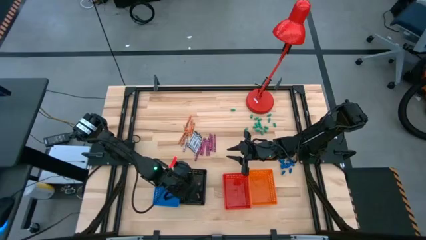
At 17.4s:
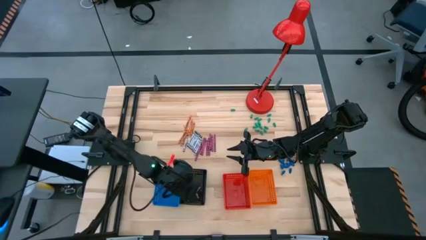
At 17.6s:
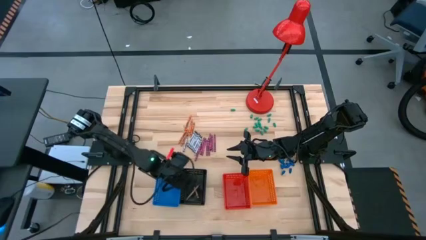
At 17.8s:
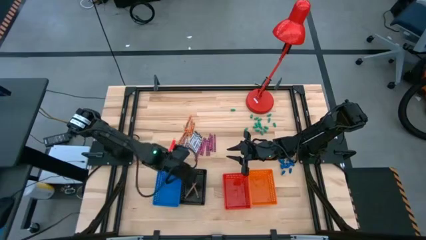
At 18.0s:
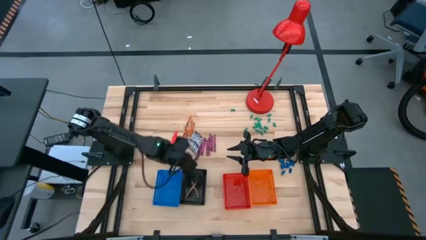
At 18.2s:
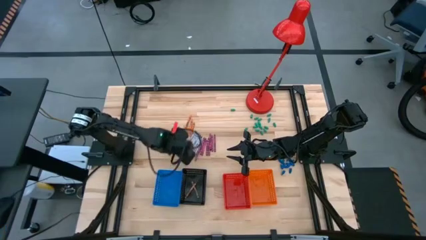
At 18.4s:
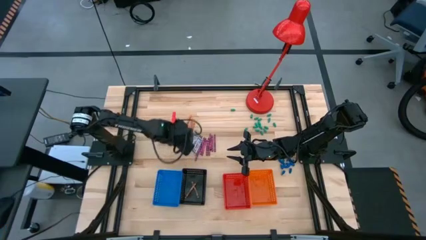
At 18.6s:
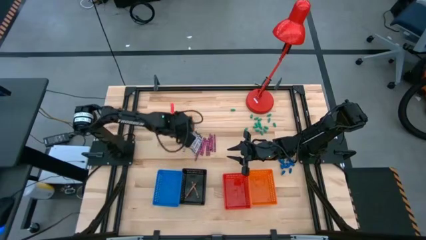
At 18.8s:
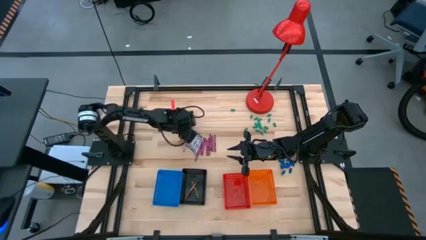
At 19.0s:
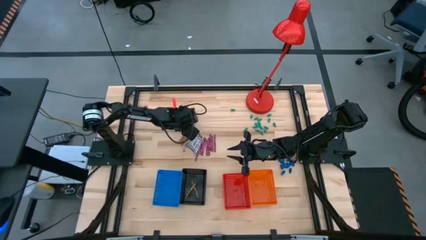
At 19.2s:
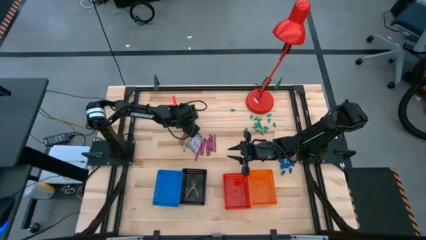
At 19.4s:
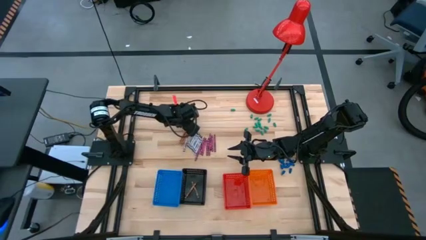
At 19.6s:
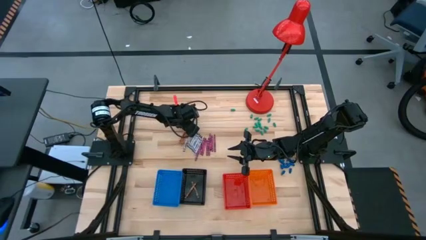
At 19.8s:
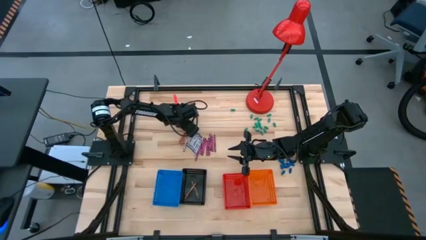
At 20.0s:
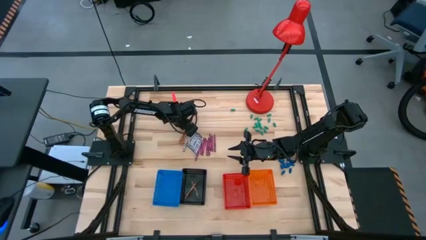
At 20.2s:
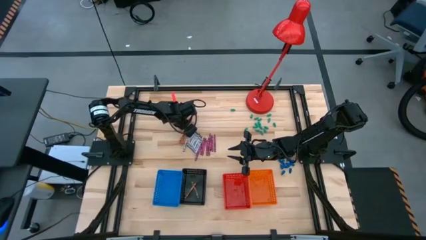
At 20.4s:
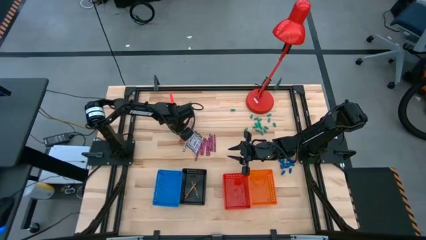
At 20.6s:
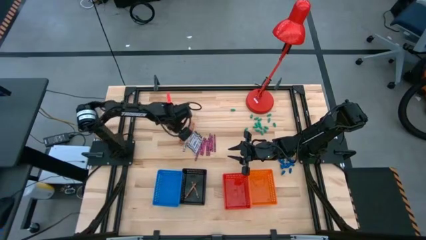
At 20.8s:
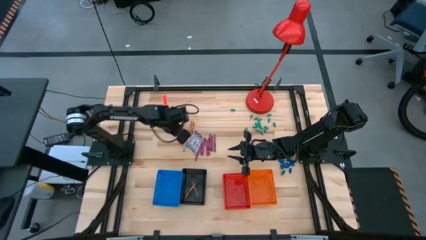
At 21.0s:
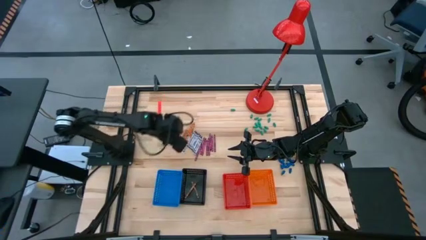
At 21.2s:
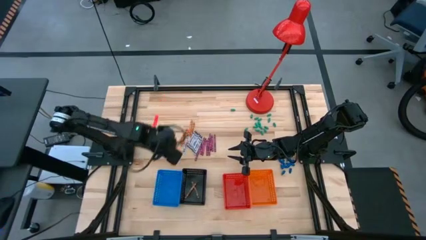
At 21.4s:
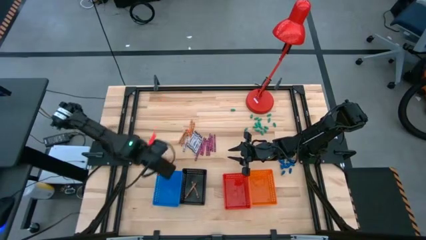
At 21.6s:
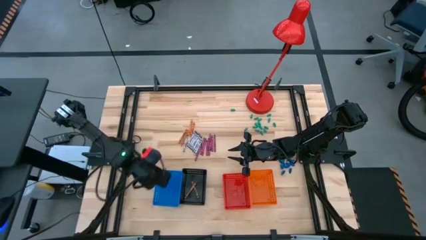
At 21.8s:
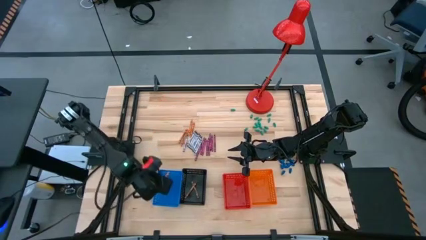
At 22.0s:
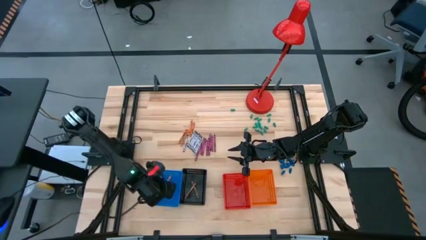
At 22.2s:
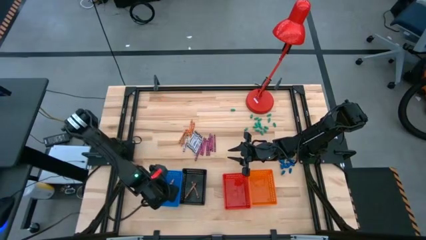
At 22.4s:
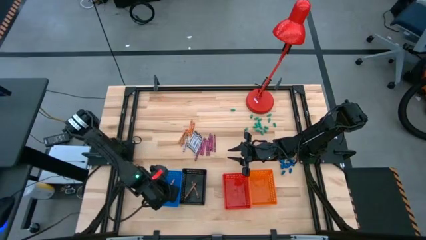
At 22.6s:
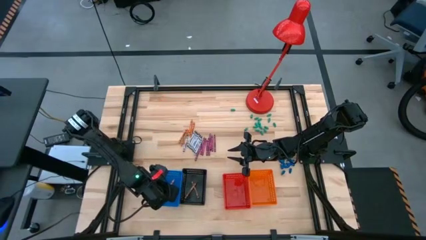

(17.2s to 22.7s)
Task: Sort crayons
Put the orange crayon into the blue basket

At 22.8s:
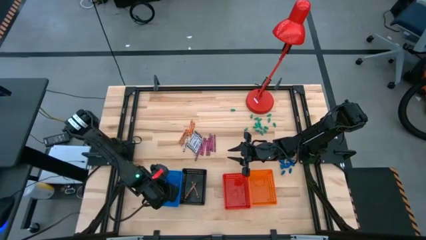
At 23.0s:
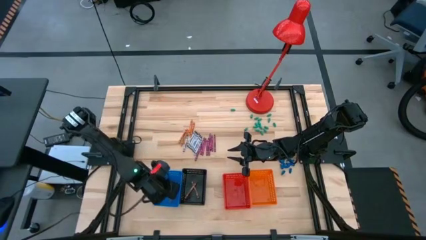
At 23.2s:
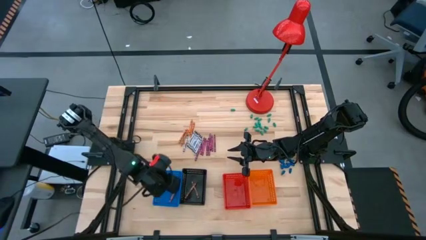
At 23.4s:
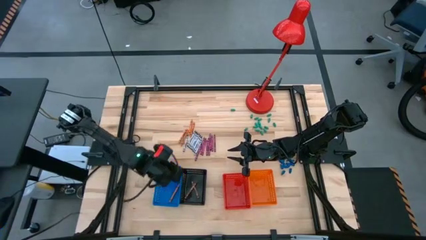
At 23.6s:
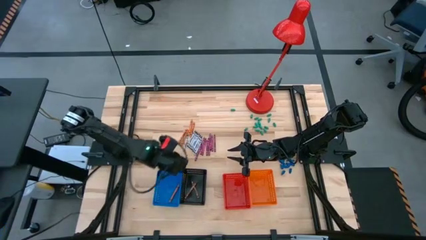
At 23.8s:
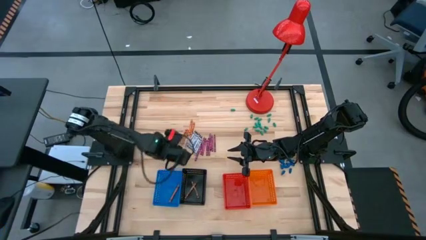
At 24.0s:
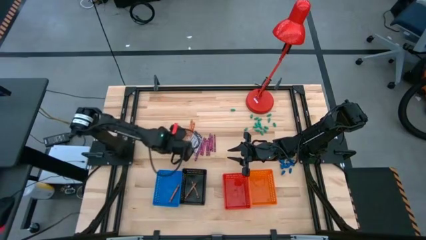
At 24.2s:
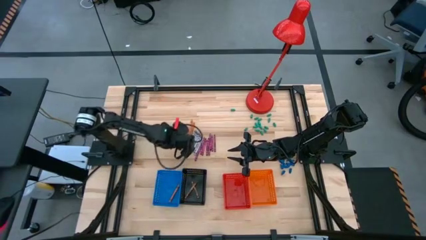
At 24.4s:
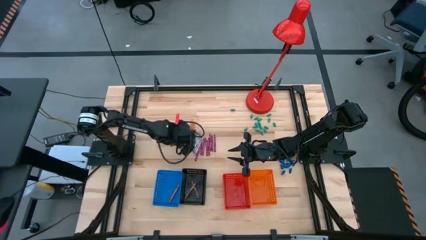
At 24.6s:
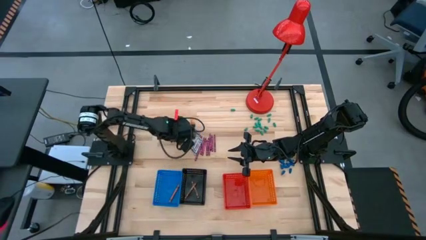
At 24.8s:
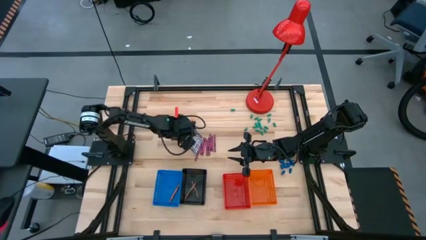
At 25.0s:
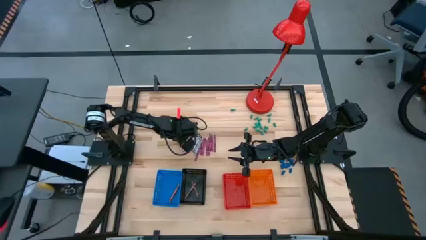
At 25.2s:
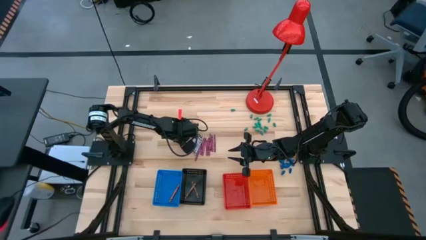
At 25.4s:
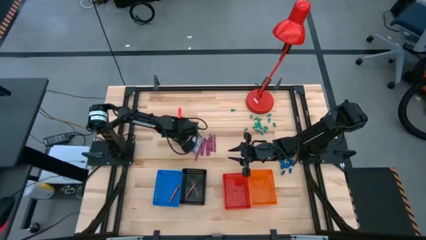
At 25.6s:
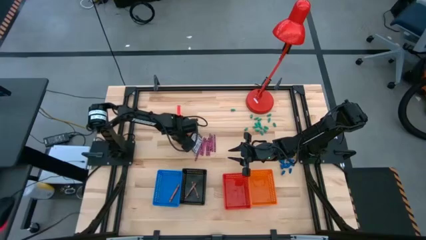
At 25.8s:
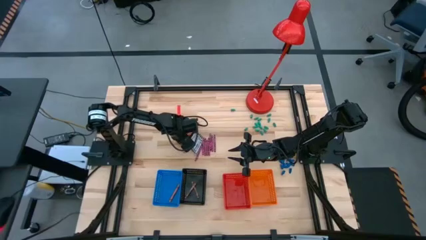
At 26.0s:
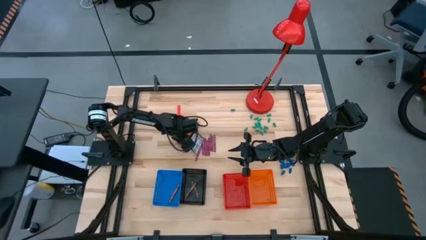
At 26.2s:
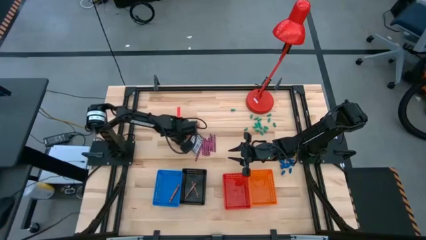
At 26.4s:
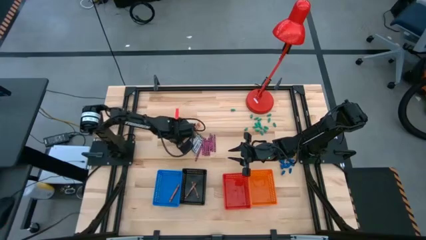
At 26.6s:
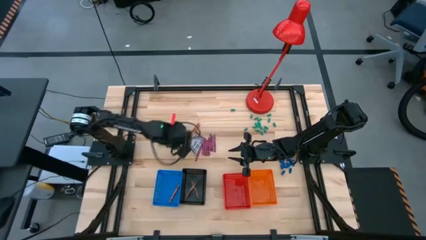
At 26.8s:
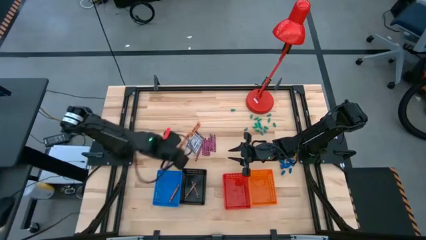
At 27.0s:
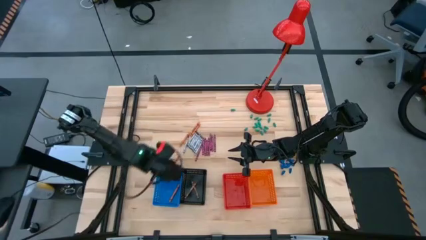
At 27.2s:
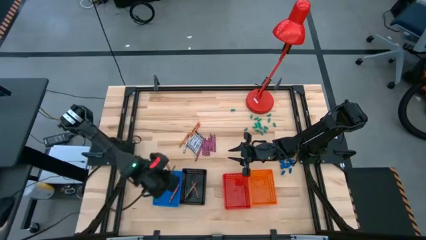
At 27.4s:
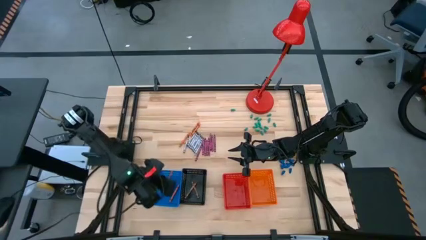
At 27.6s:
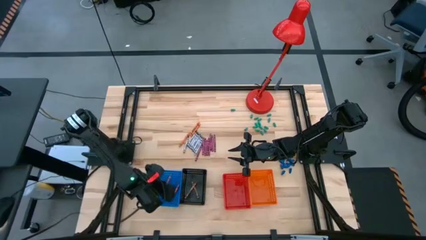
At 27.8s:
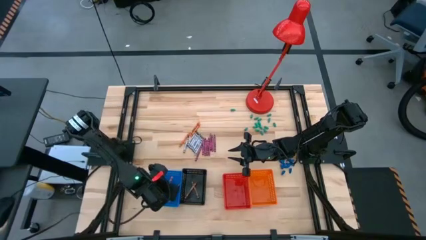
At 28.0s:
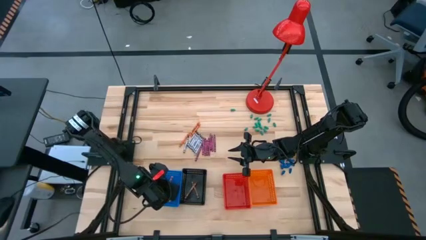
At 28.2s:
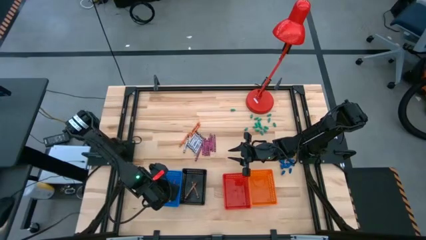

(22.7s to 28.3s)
Put the orange crayon into the blue basket

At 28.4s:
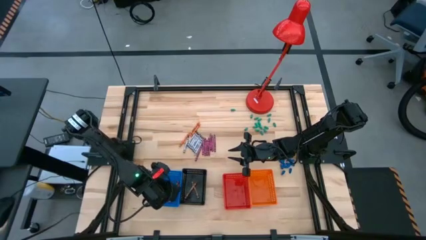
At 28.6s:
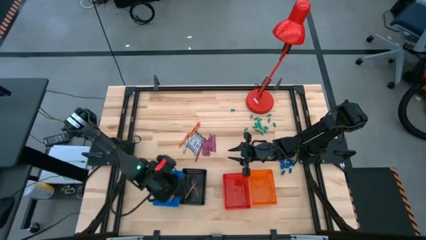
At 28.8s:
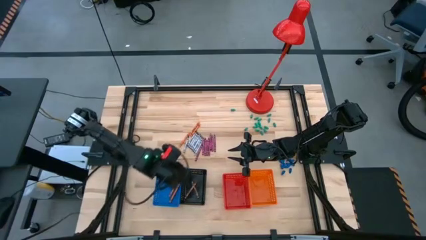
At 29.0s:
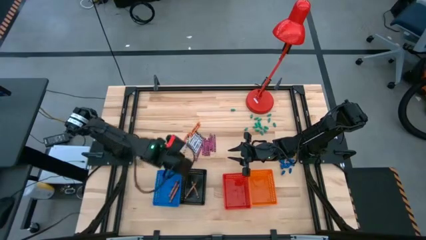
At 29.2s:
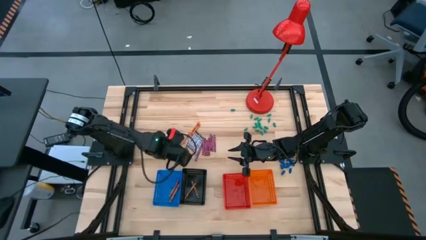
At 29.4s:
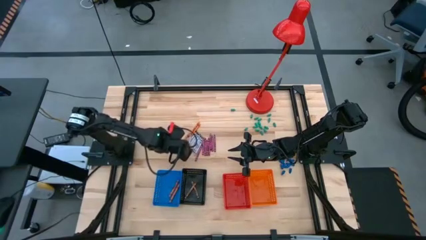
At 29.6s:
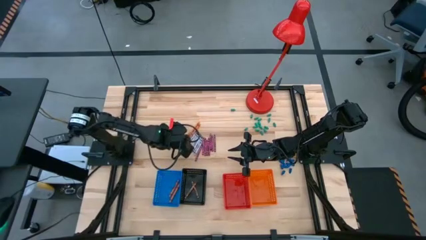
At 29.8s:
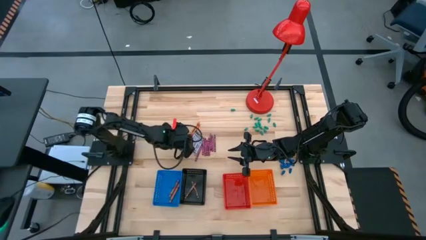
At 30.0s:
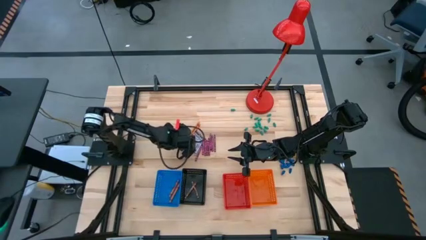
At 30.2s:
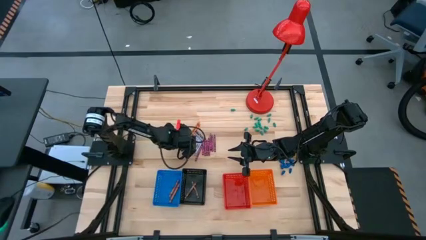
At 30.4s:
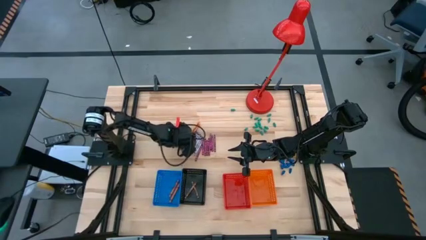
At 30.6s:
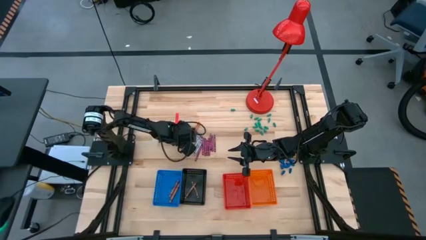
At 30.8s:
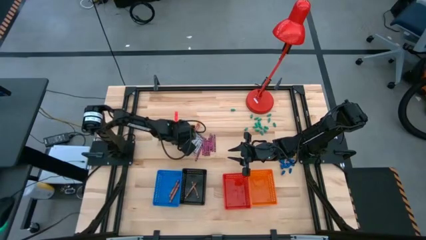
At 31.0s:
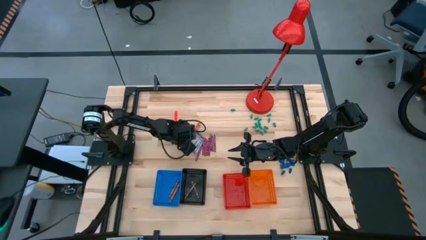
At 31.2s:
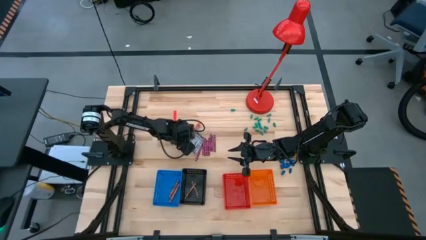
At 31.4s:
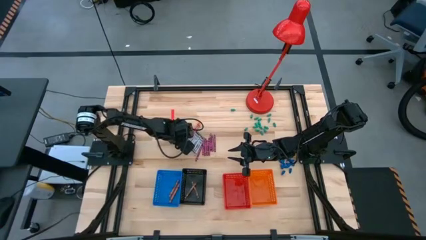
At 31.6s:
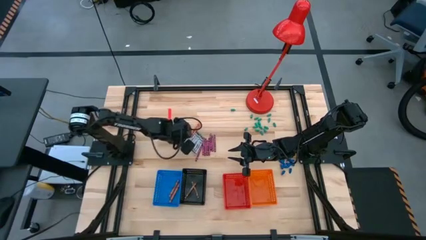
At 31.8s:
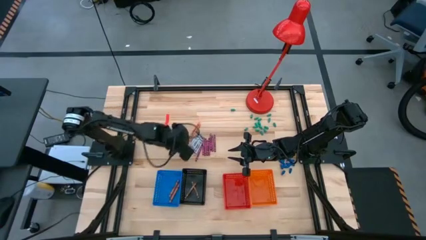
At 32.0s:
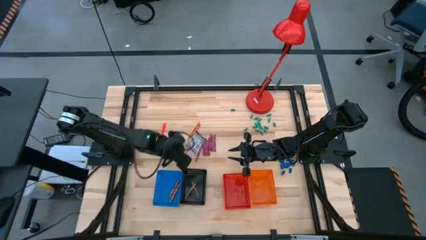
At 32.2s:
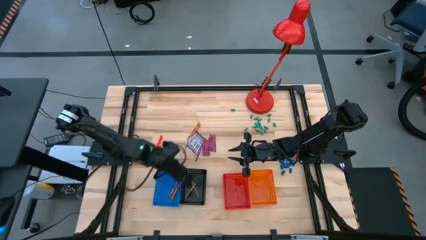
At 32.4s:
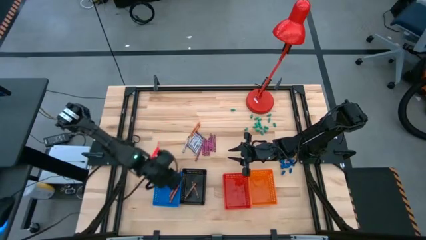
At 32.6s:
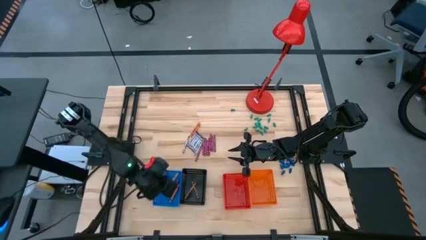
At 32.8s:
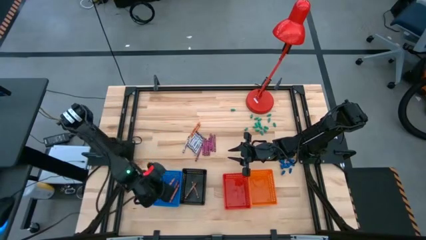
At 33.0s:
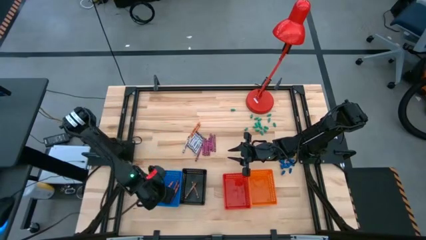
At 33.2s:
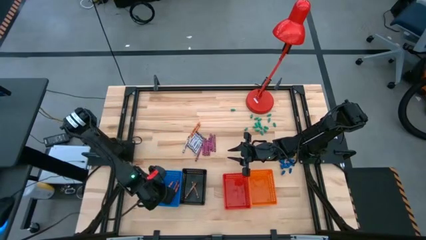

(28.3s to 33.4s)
Put the orange crayon into the blue basket
